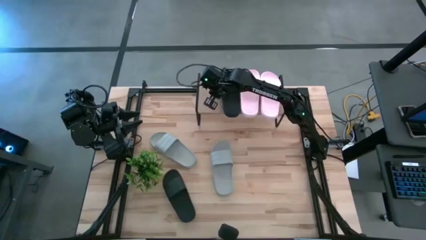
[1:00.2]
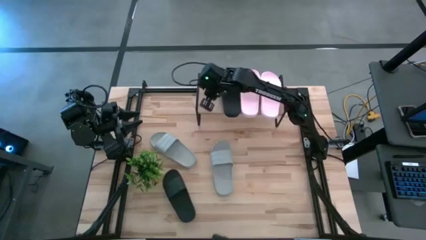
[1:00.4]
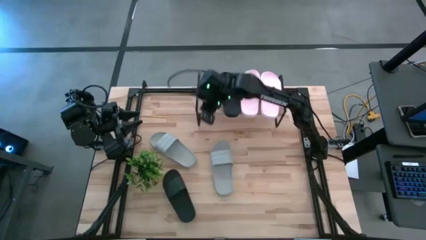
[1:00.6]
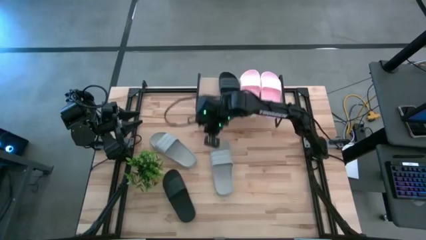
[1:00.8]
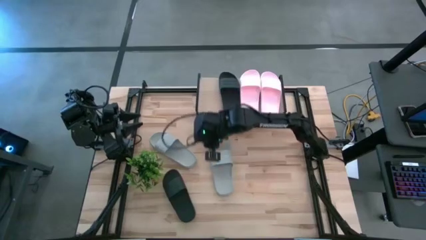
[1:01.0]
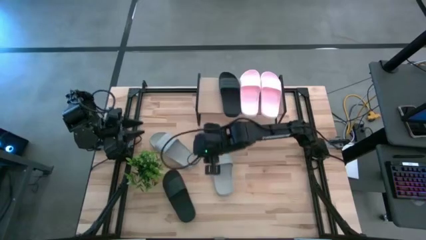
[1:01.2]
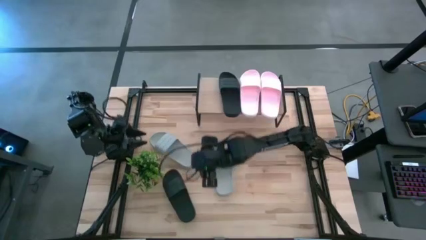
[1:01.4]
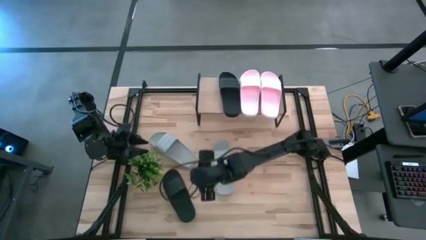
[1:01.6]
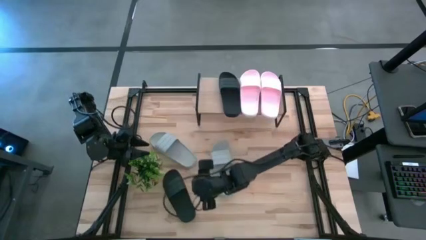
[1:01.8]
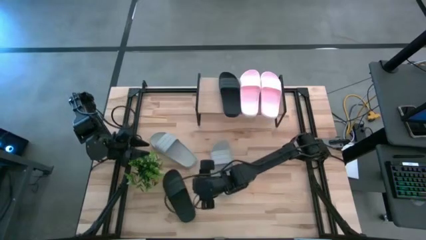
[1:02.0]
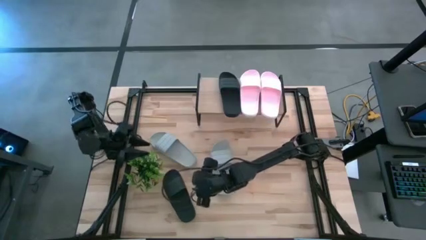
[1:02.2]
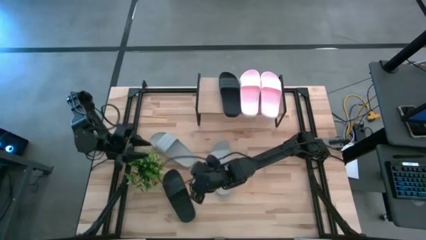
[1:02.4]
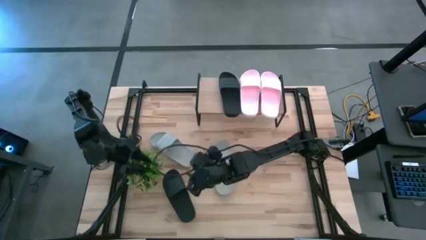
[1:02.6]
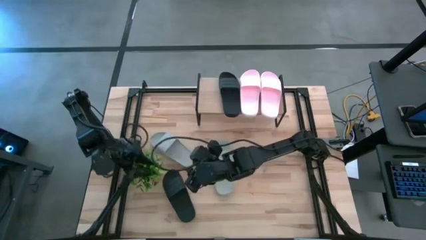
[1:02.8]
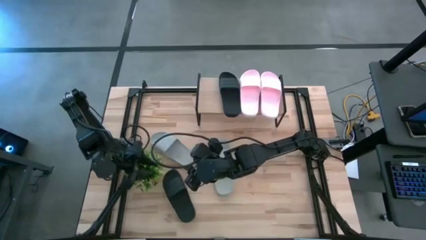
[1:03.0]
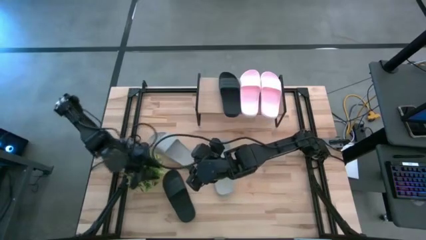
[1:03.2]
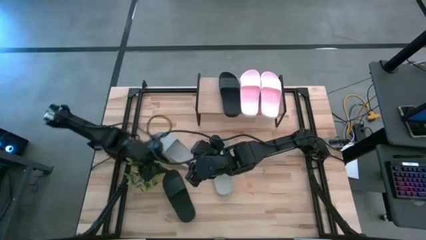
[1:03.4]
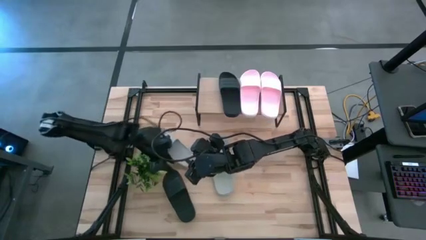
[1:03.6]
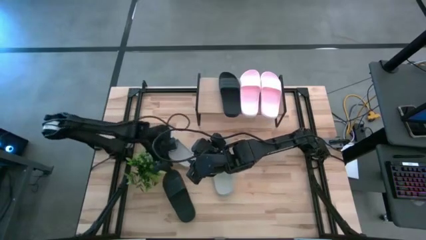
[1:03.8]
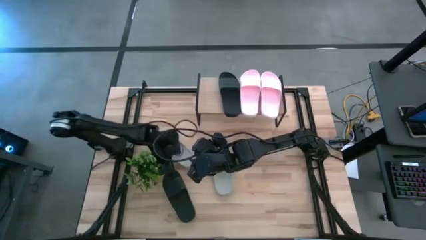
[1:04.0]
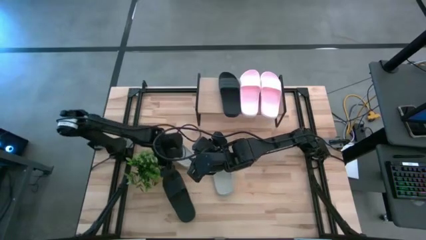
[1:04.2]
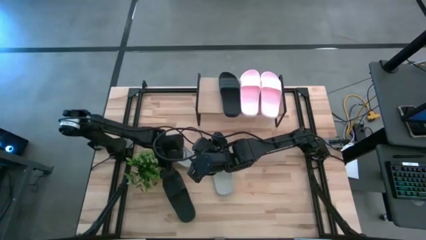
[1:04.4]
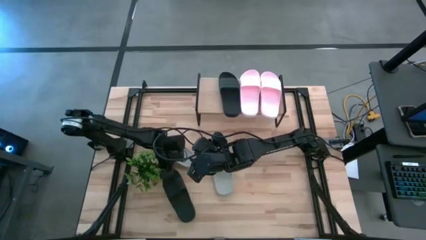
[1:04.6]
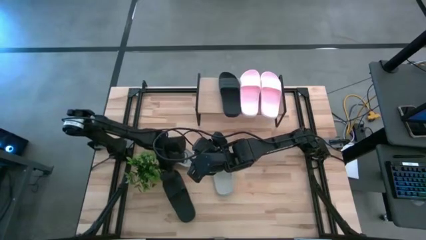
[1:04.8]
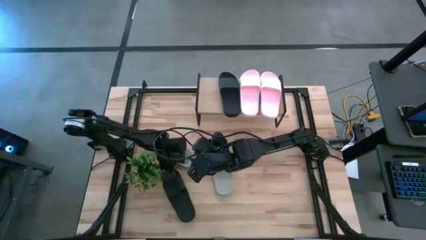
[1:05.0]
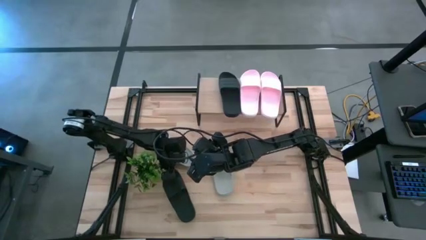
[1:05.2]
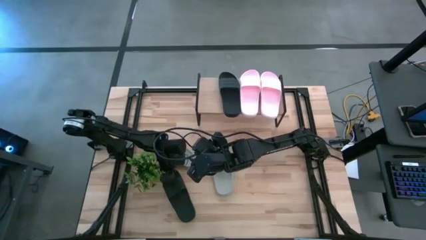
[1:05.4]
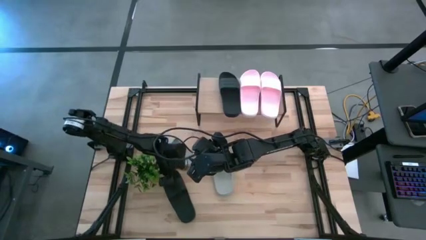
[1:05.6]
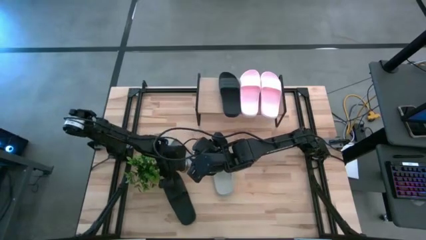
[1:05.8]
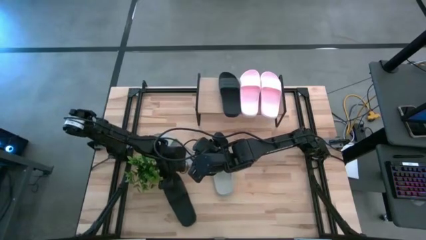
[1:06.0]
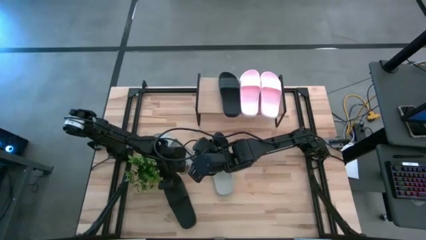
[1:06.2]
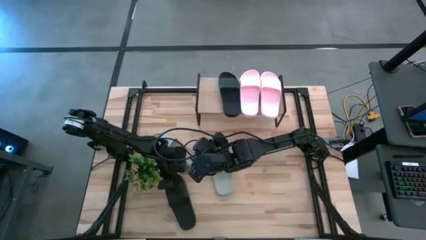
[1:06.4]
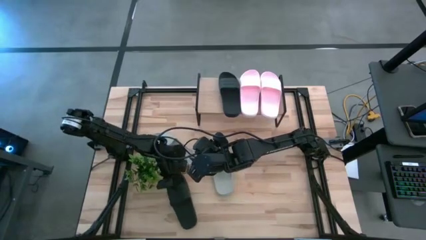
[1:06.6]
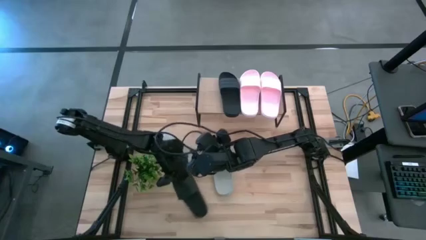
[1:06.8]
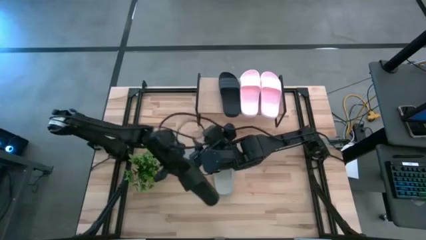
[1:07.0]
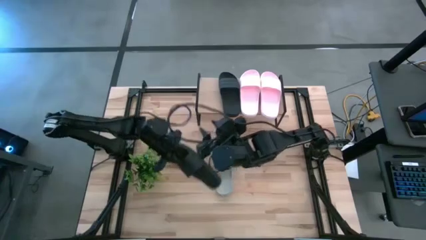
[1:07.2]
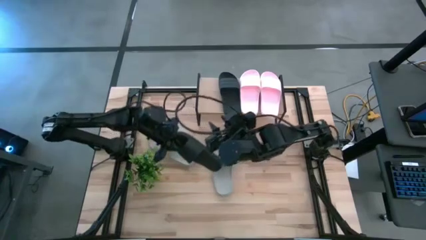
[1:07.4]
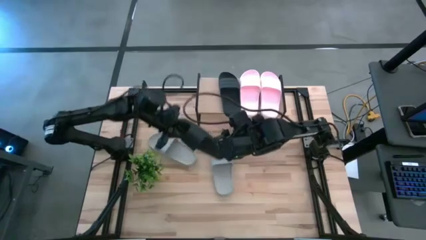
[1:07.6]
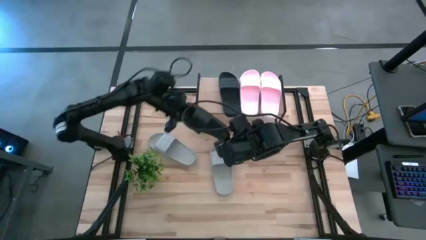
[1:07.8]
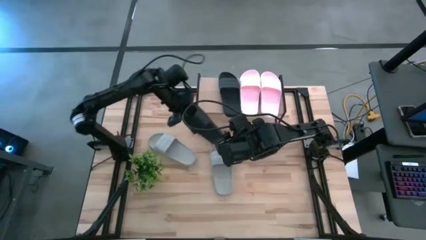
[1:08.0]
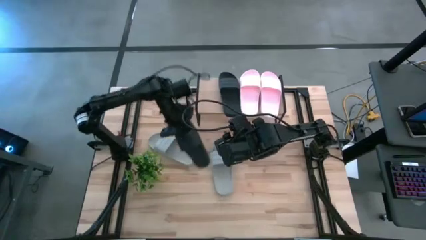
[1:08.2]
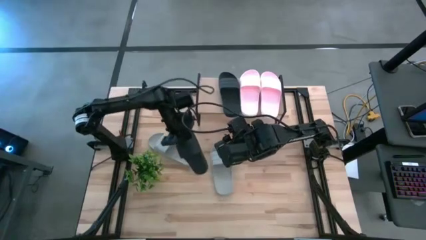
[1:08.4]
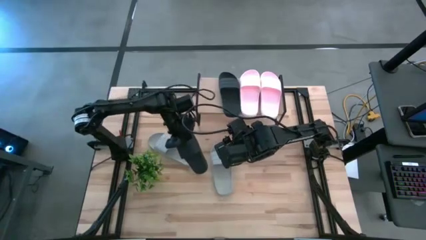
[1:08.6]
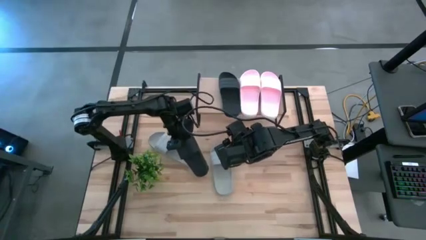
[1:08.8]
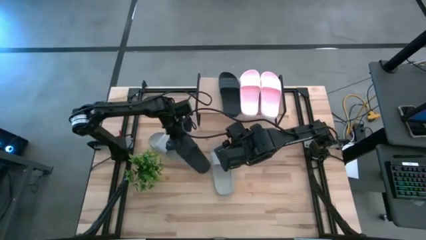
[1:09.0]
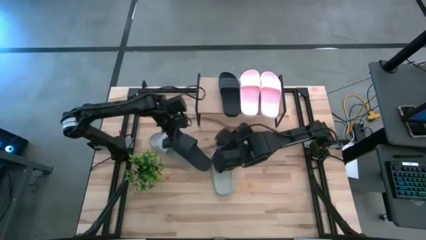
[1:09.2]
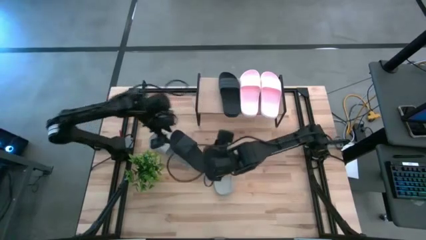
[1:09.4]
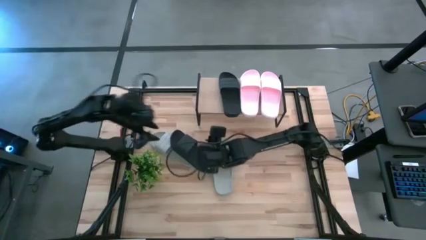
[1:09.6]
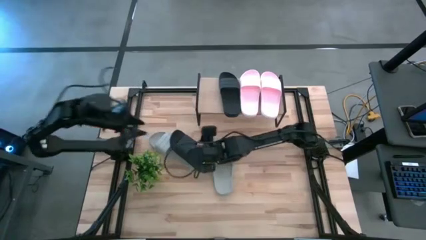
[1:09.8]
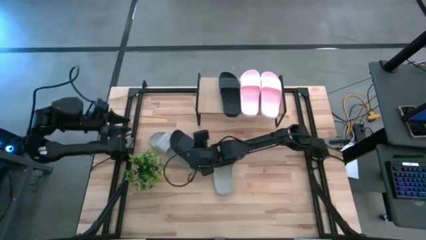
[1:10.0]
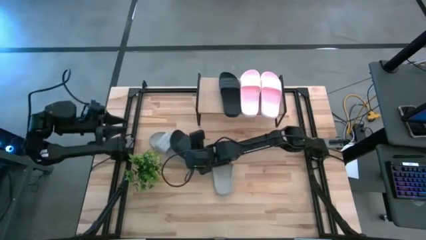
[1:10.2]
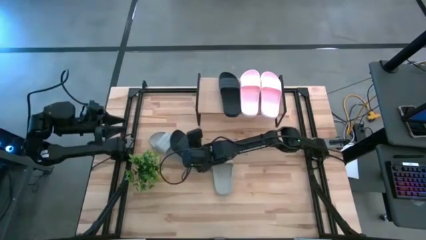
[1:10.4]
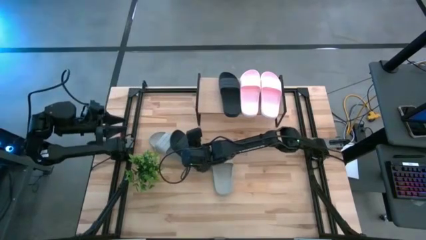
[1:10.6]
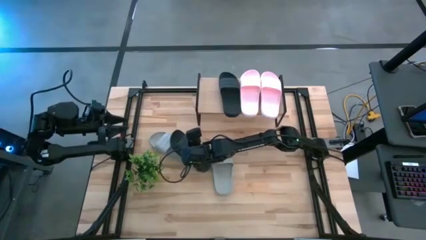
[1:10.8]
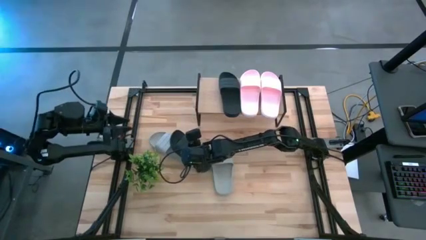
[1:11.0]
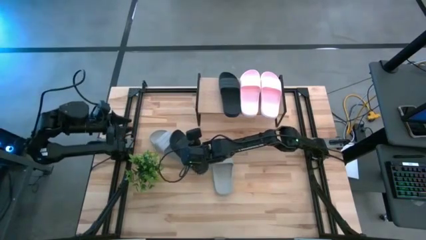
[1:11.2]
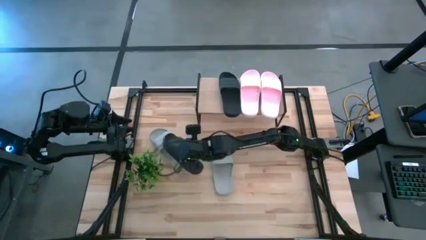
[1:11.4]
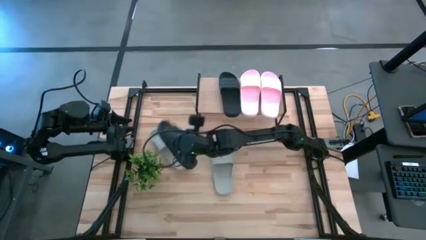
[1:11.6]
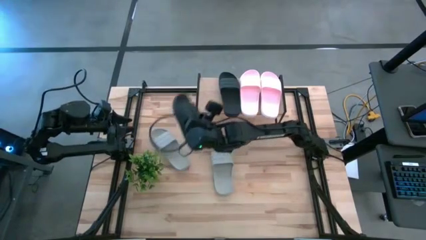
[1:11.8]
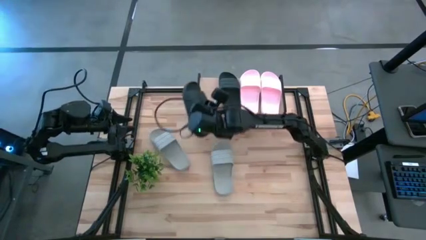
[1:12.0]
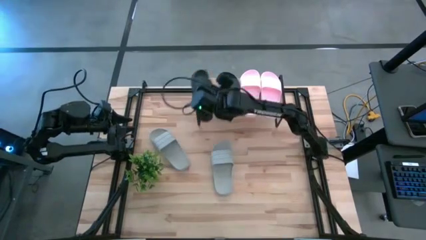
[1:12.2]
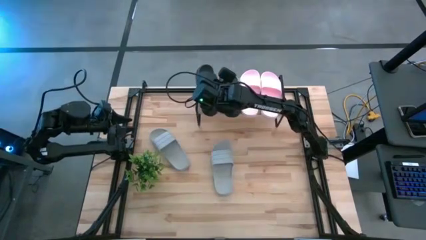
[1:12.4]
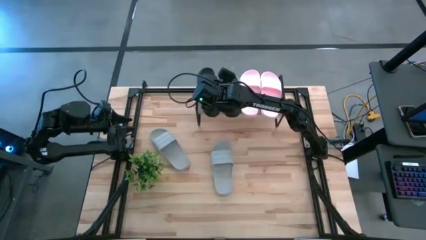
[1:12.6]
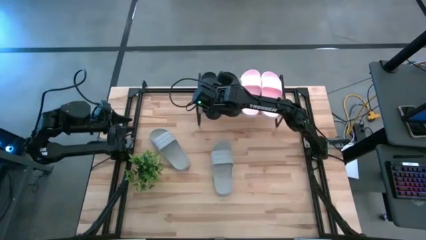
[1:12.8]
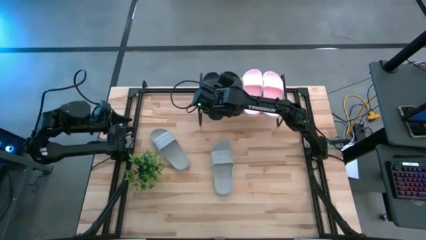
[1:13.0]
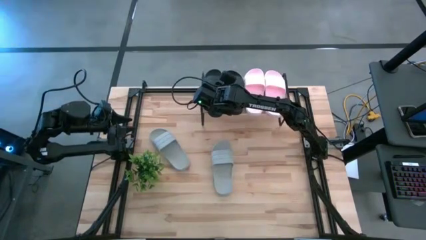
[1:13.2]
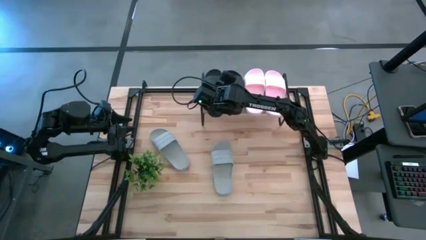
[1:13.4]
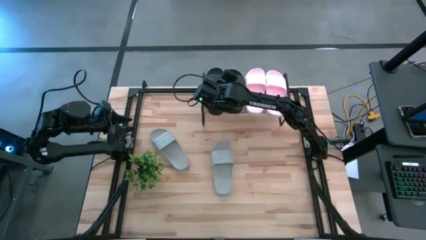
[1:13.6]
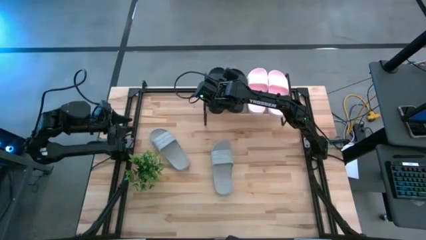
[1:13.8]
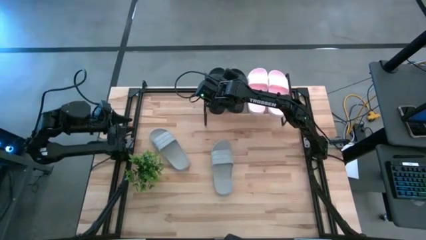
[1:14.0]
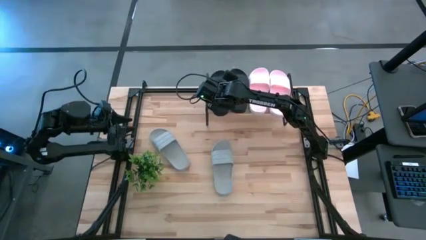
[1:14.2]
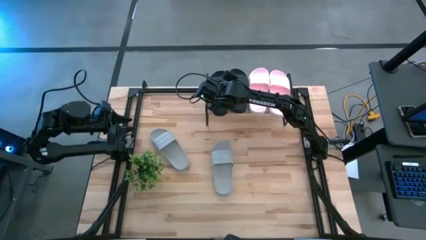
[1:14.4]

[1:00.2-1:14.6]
Task: Pick and place slides into the shelf
Put the black slide on the shelf
